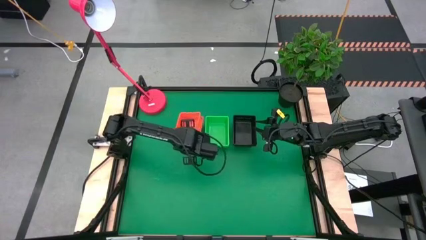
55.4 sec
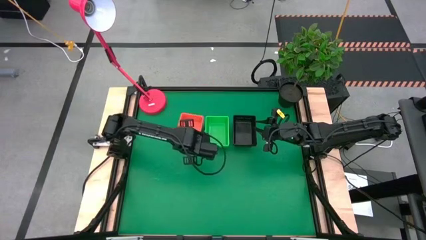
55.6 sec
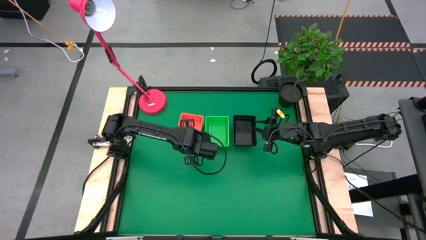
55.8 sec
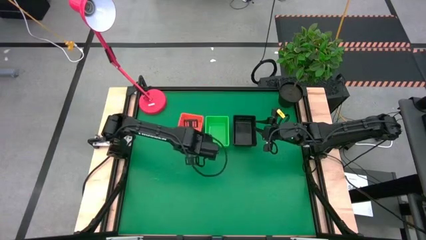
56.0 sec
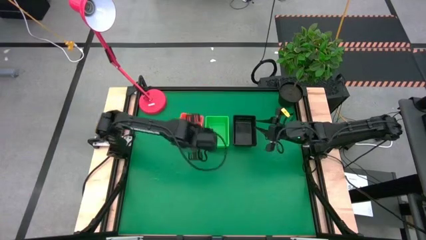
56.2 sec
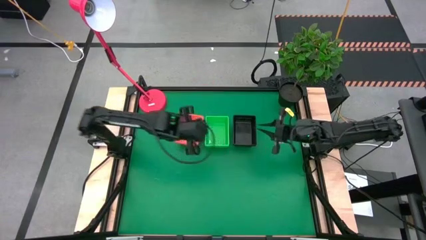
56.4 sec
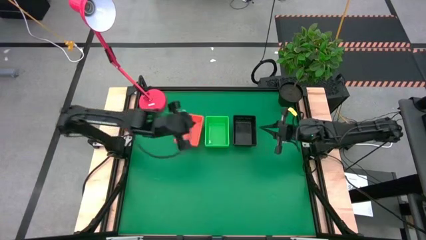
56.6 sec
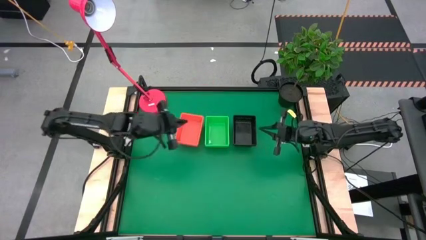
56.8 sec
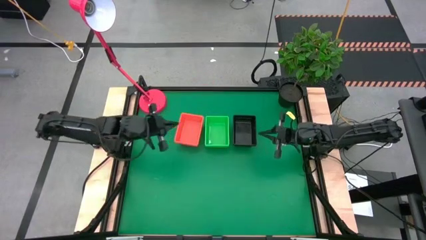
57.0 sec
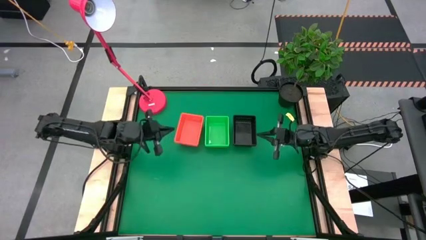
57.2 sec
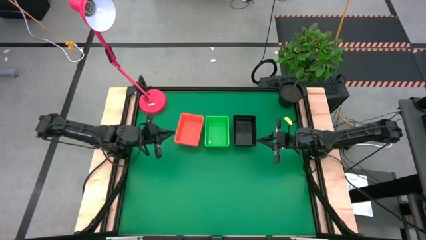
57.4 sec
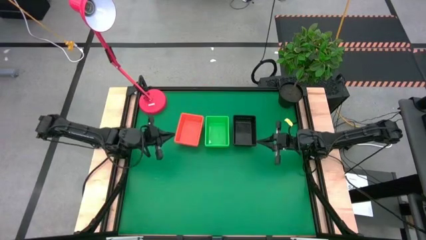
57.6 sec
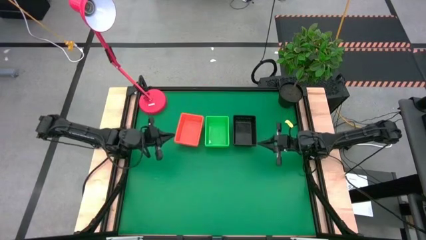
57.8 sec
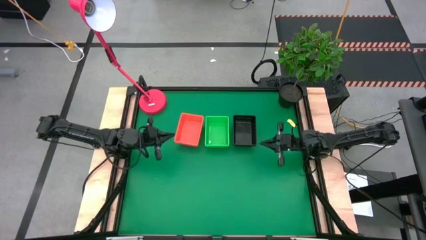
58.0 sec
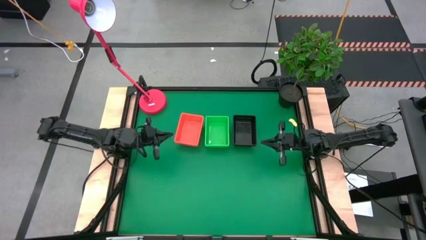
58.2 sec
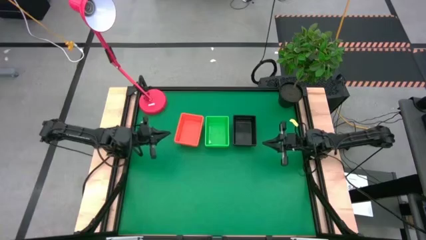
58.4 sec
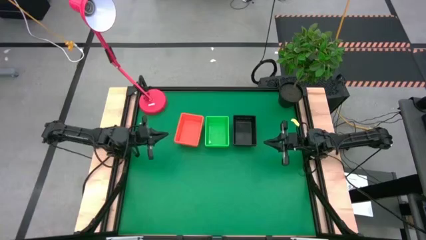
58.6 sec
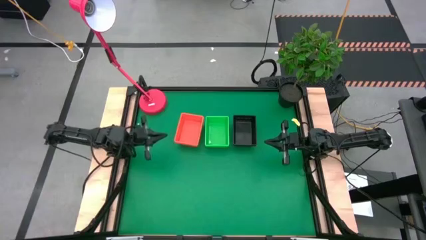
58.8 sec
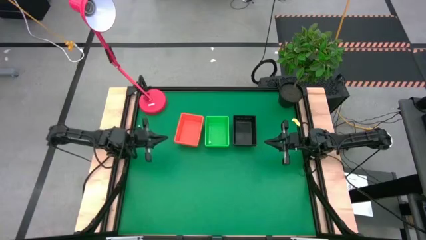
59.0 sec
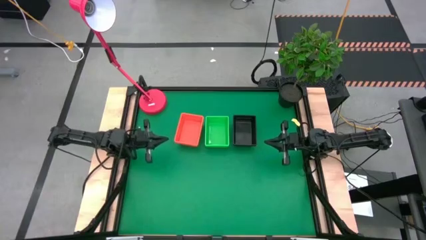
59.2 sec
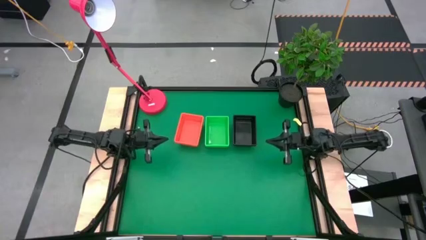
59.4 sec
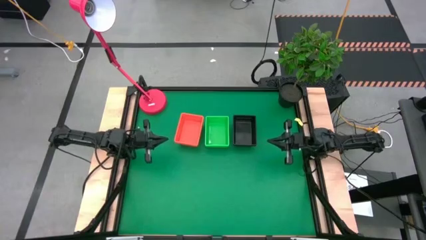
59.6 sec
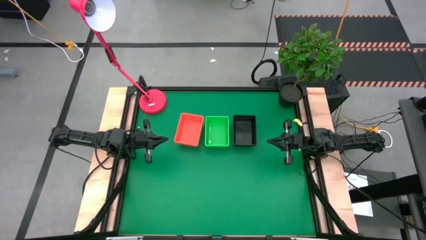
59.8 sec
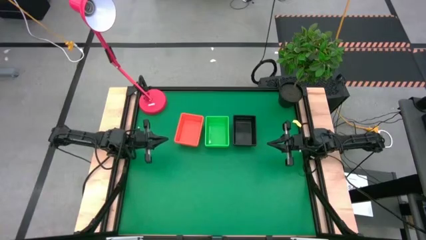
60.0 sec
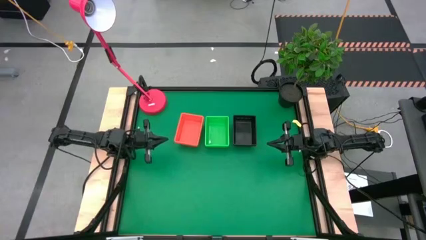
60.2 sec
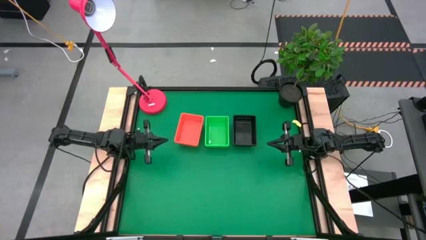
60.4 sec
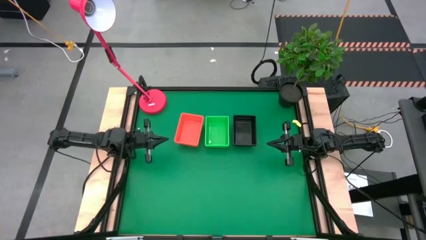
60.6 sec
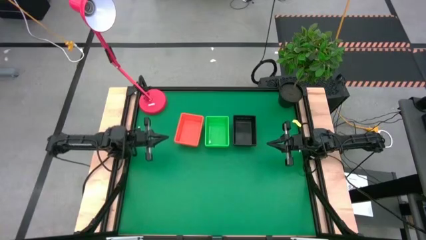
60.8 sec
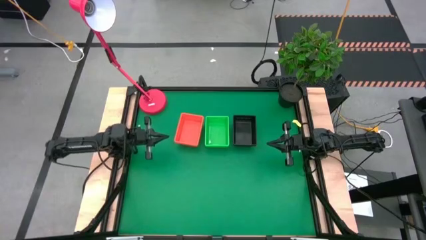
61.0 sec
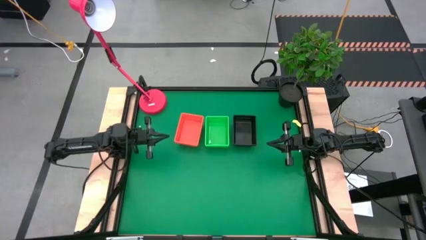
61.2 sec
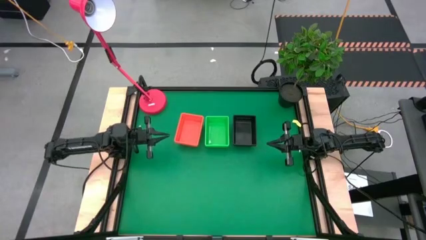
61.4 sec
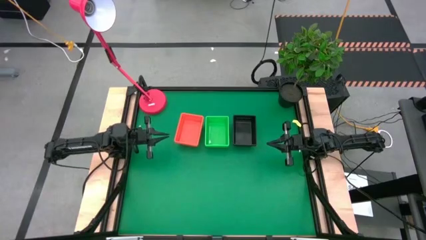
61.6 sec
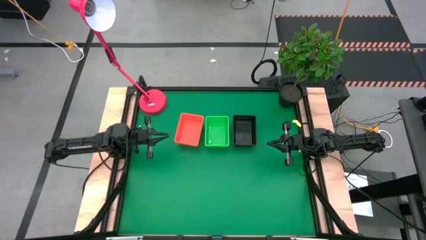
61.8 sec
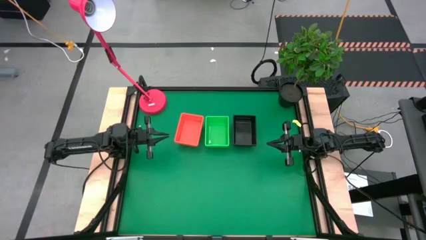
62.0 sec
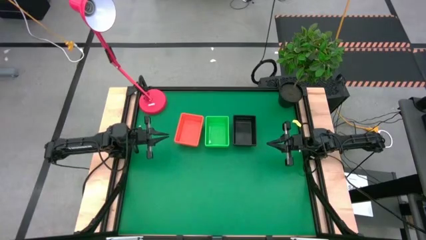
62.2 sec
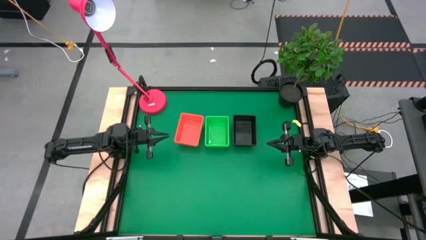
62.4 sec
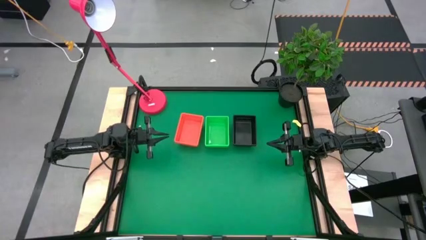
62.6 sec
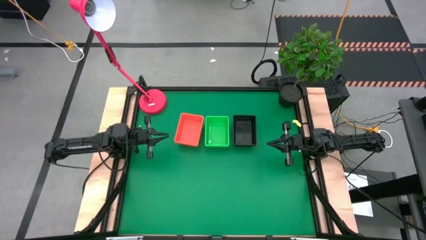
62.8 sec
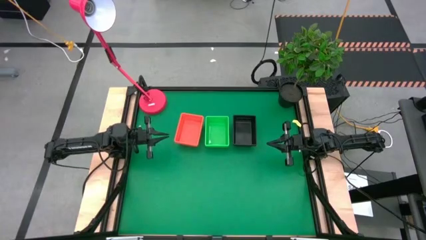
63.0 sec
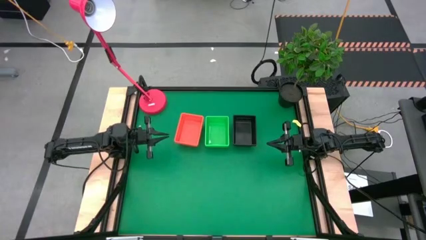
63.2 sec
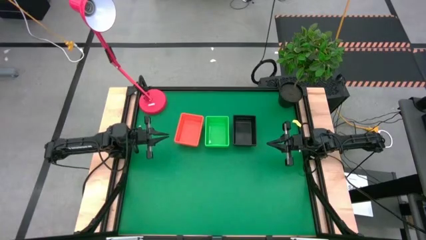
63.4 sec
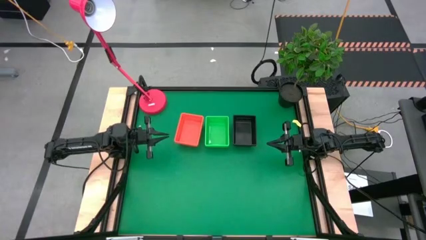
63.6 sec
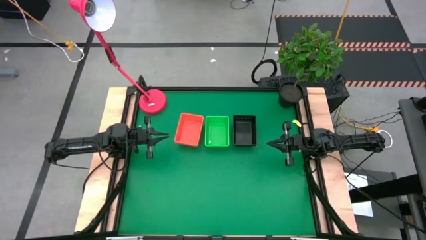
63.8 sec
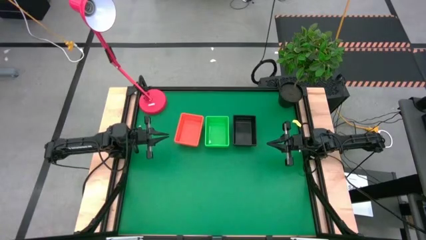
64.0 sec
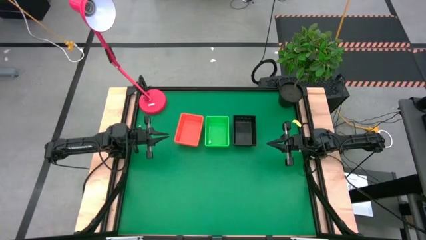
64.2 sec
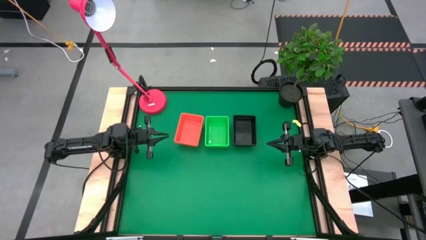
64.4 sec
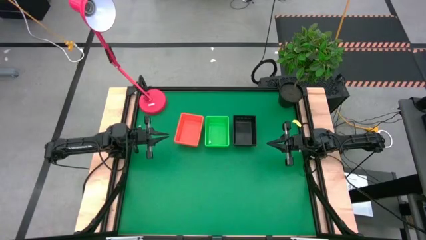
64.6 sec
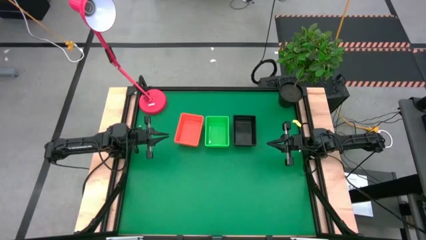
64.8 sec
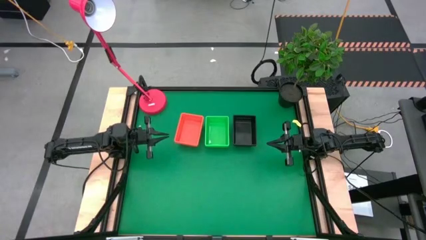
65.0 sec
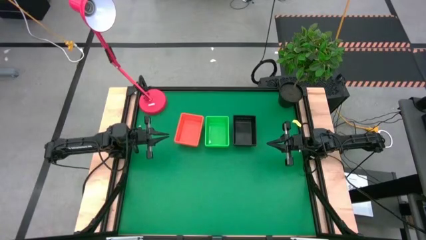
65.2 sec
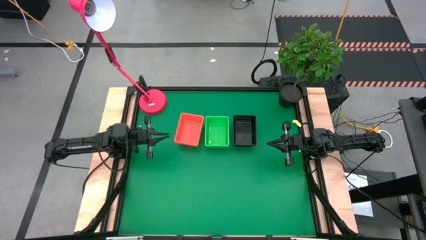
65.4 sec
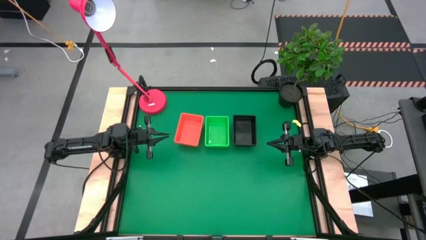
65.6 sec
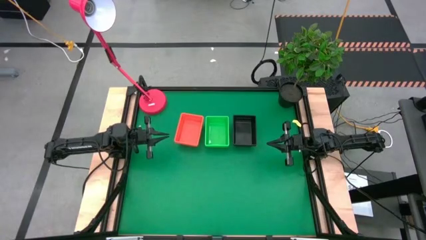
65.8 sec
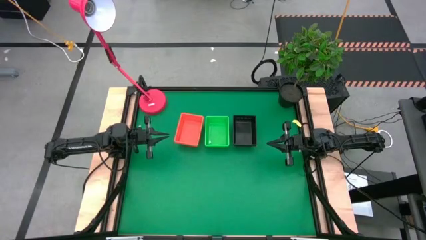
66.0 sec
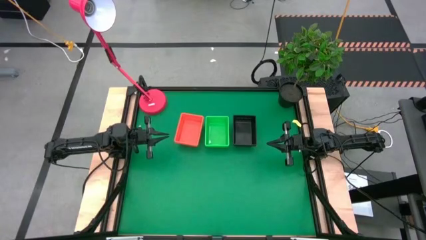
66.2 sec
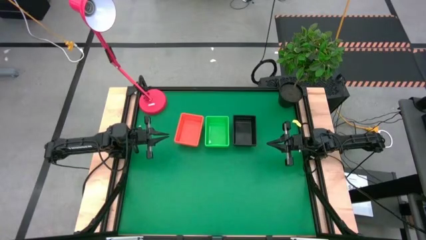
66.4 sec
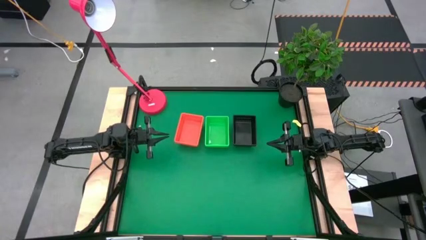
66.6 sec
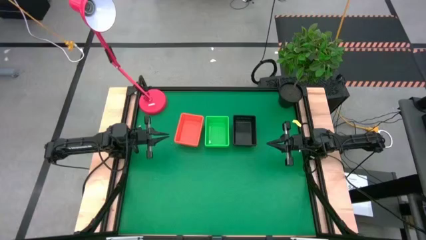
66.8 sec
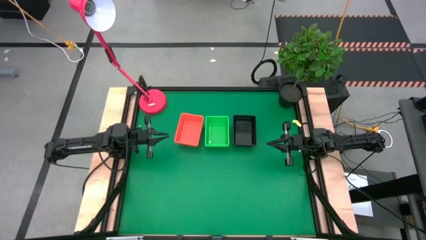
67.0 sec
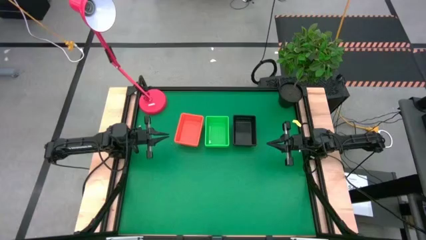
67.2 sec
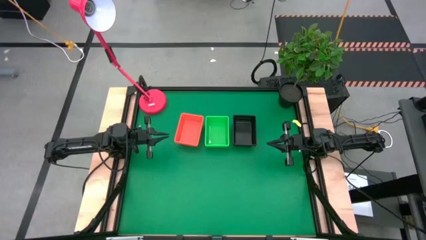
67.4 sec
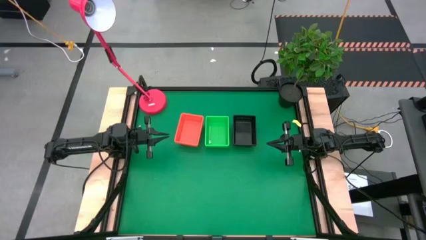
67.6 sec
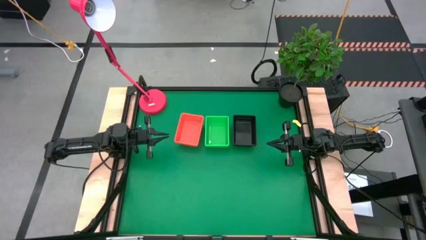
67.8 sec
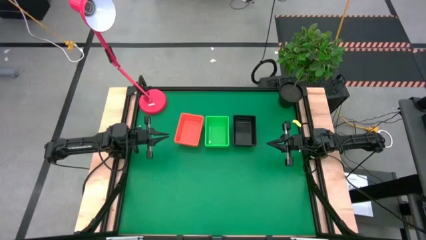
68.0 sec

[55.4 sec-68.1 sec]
Return to Home Position
